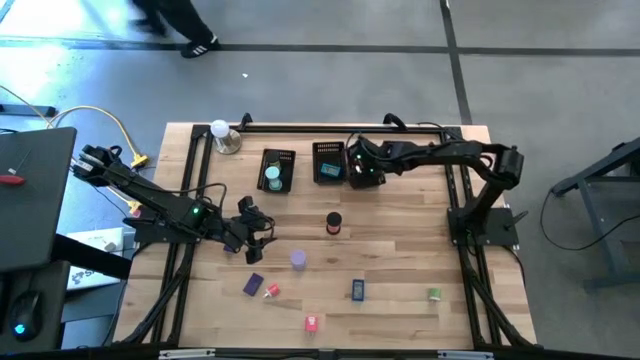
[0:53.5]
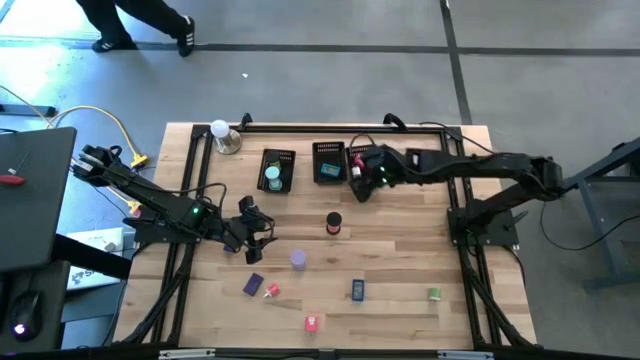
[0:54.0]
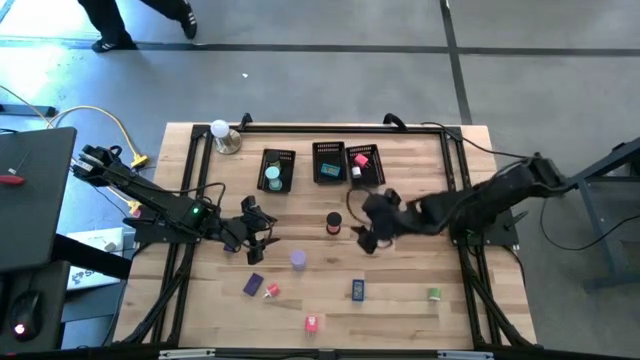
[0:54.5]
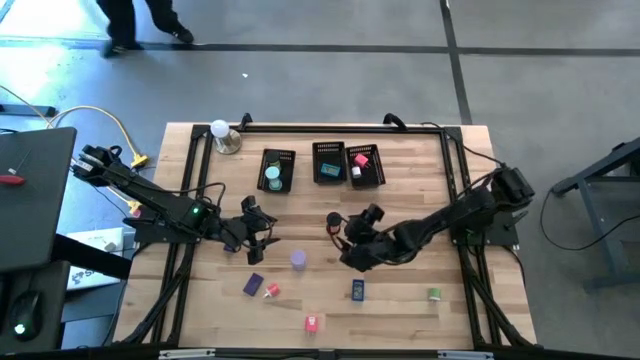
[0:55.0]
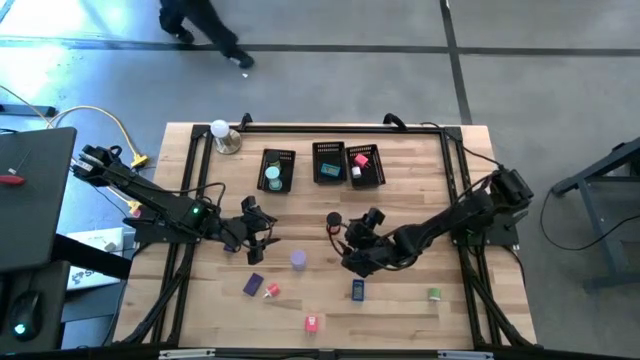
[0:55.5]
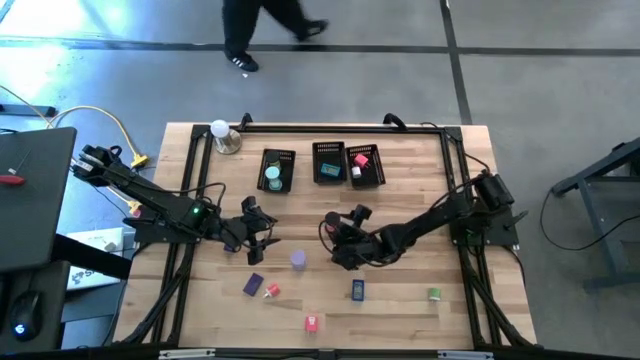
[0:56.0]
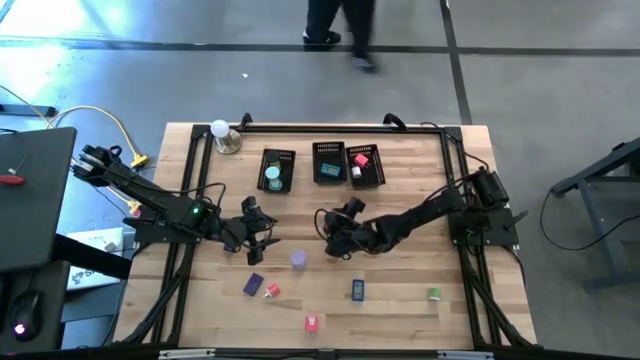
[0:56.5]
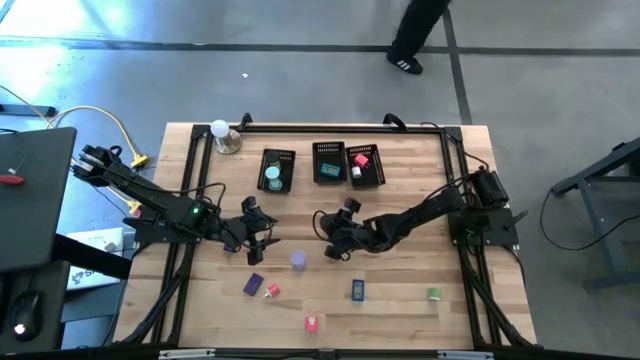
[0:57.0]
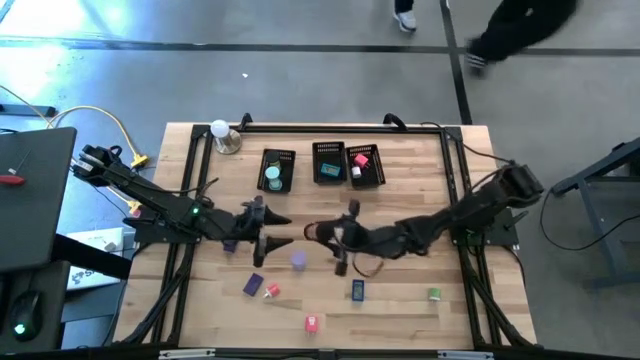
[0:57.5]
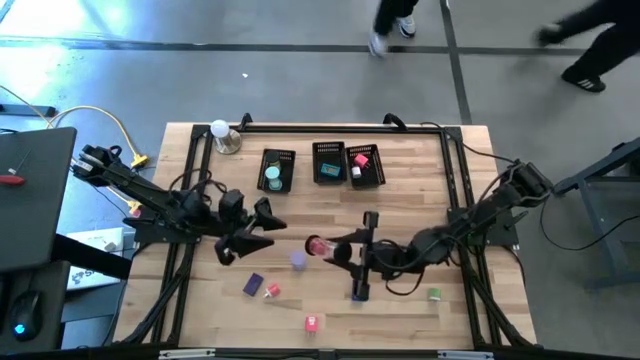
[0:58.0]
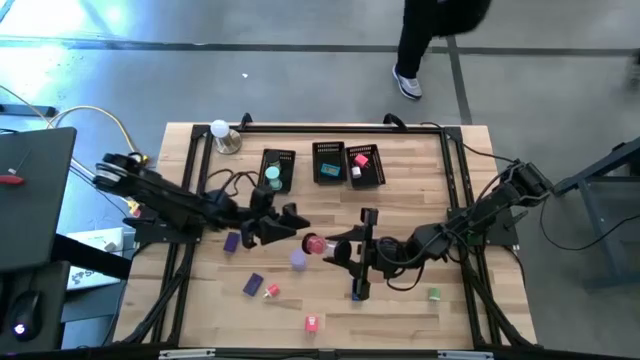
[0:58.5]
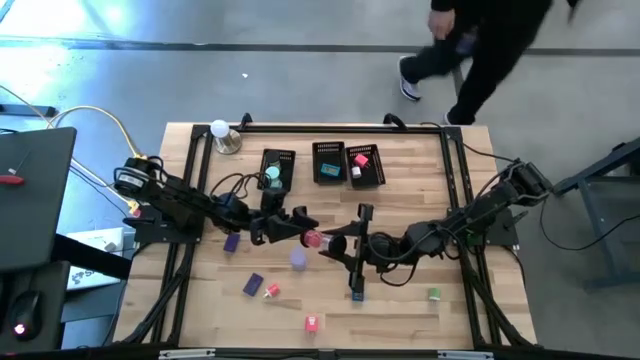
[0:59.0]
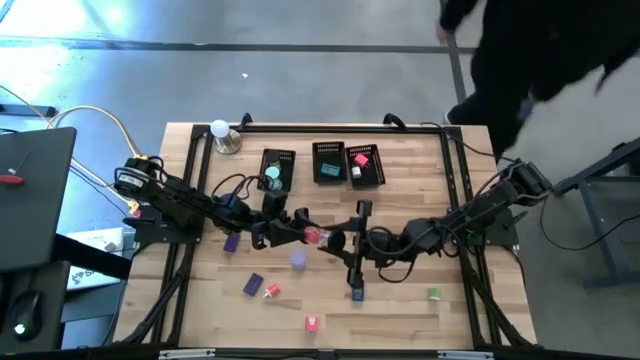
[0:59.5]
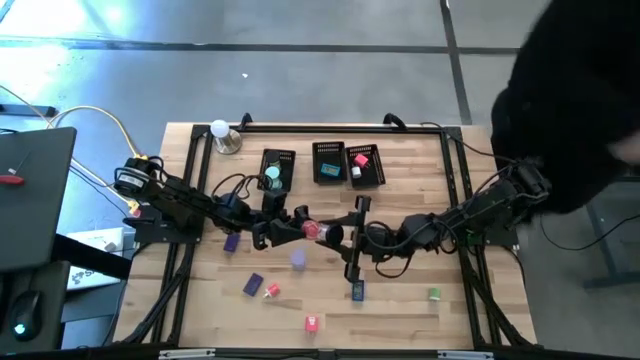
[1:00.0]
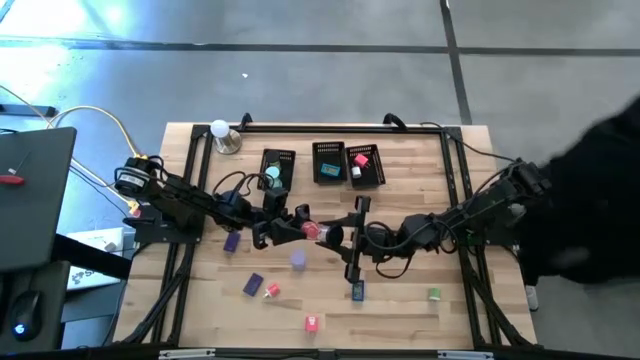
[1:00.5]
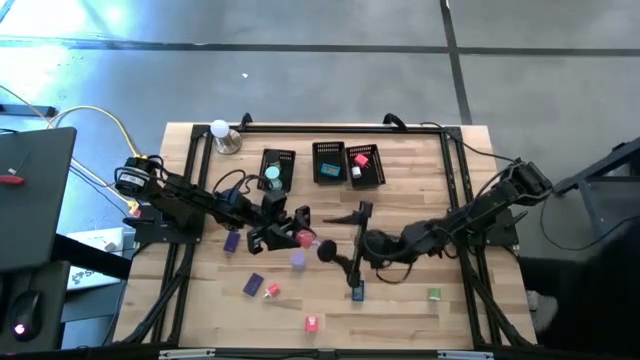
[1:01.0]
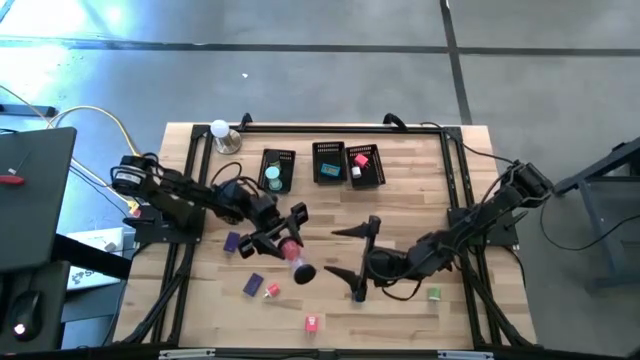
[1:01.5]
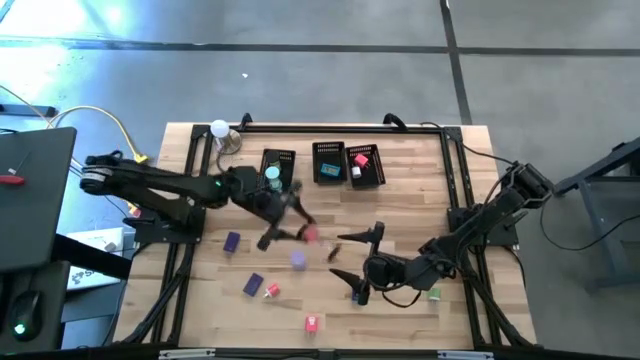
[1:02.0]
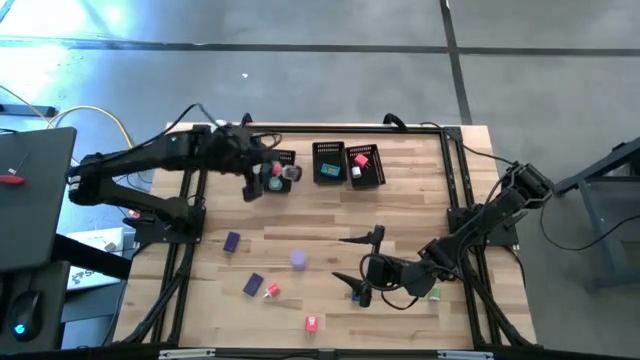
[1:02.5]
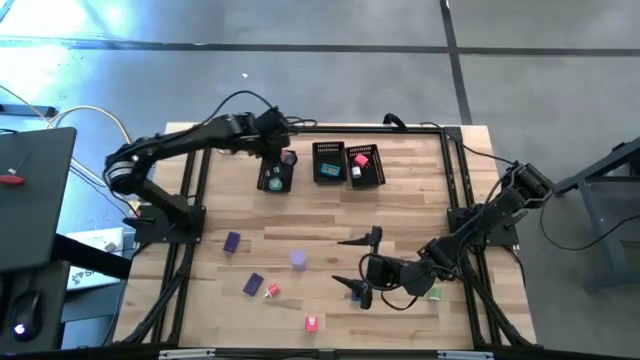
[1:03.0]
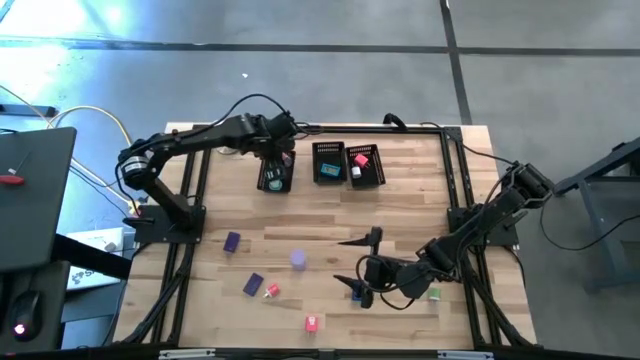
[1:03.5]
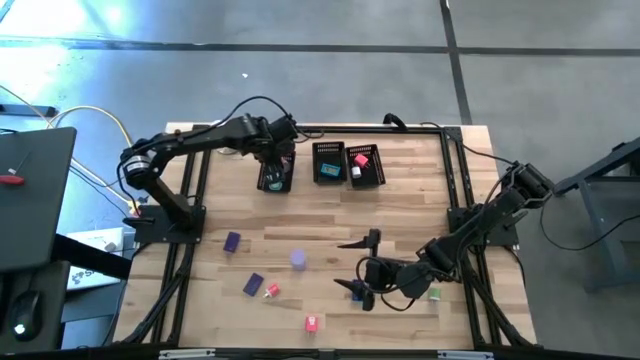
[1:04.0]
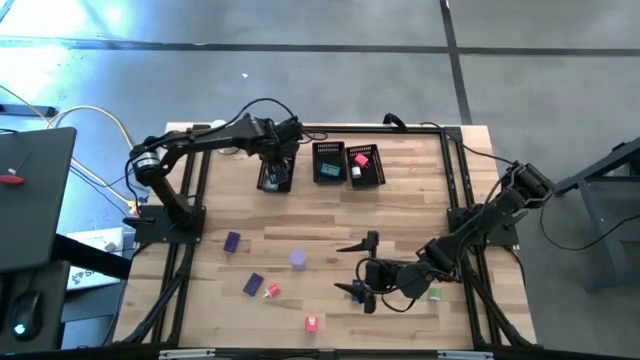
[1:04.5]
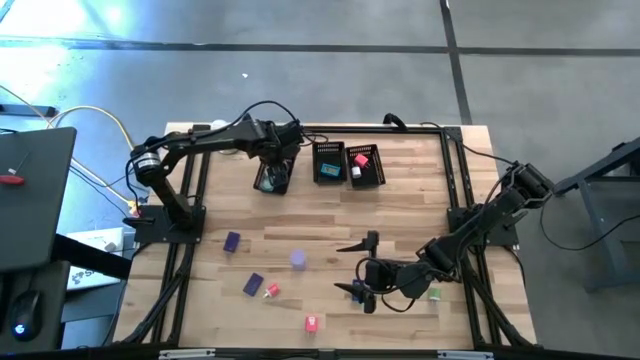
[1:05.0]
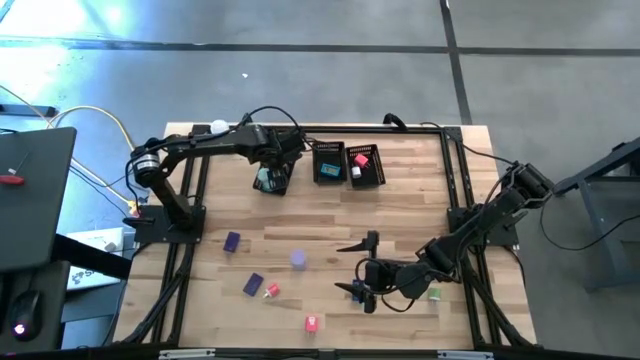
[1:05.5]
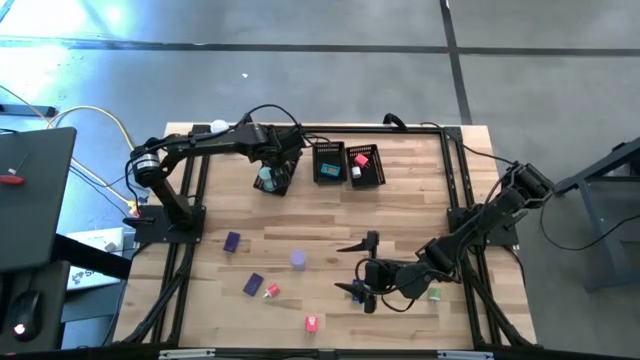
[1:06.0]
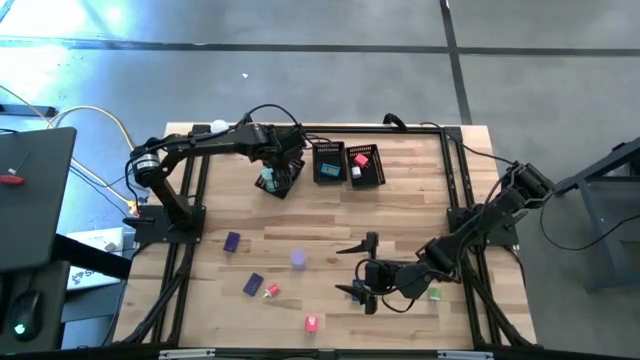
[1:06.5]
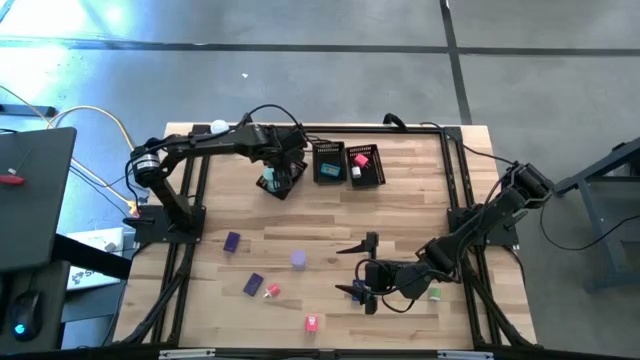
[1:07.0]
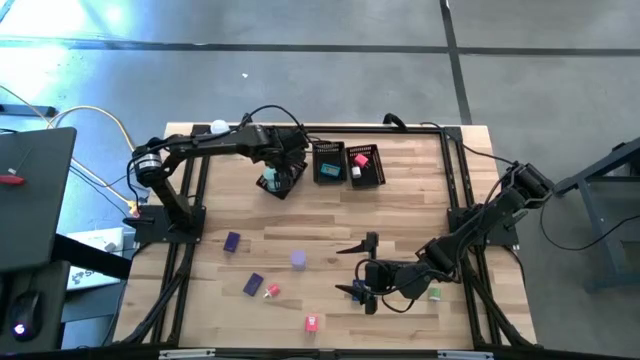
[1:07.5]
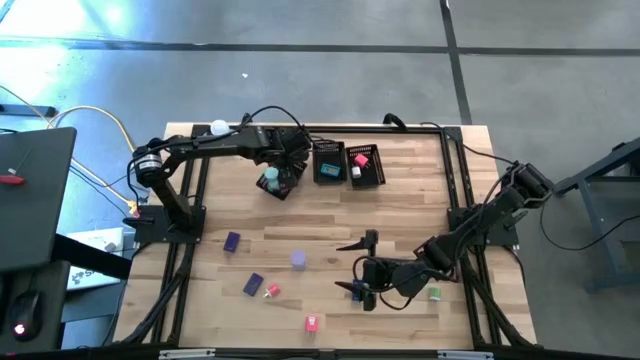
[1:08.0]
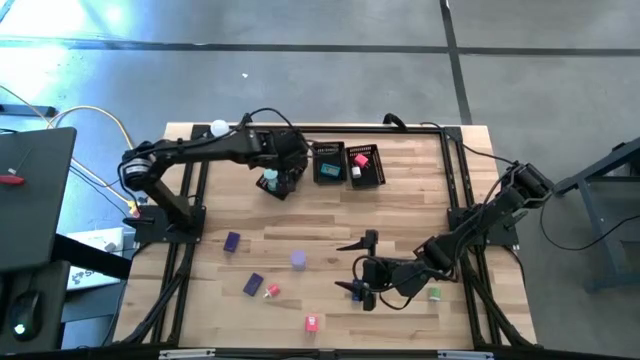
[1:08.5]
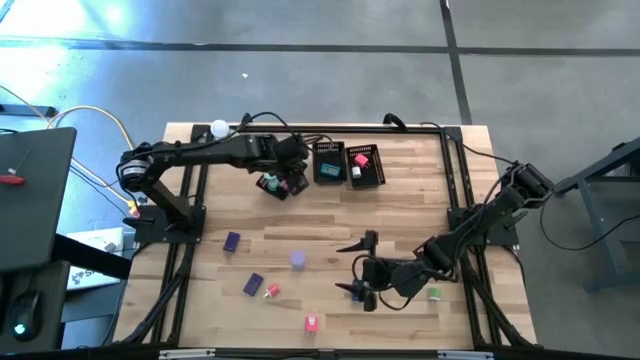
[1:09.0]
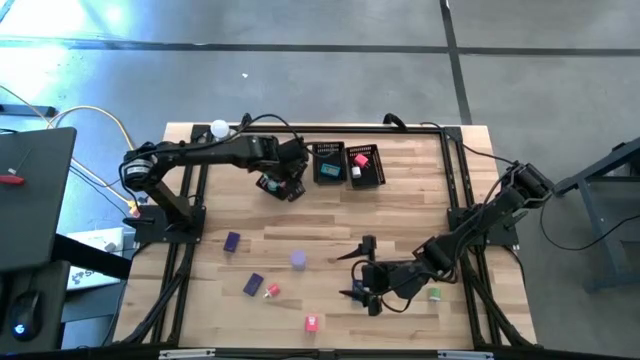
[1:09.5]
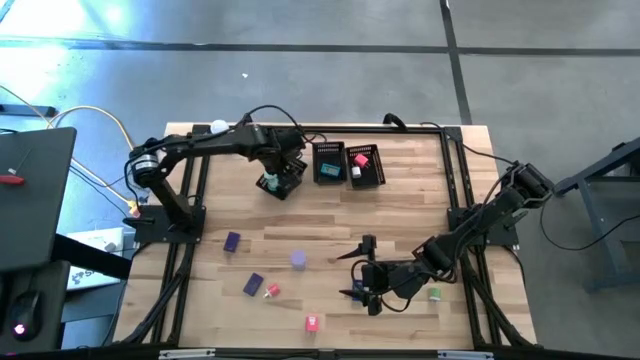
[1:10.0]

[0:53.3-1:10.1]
Task: Pick & Place Office items
Put the red and black hourglass into the left black bin

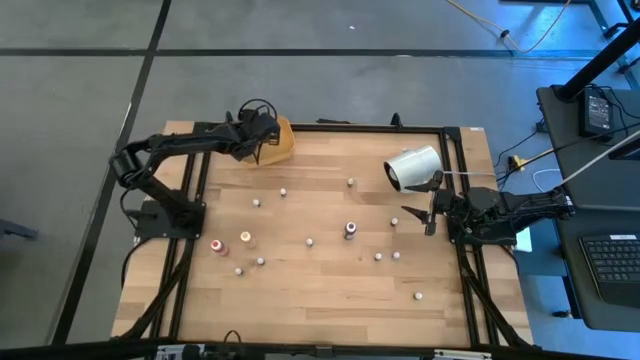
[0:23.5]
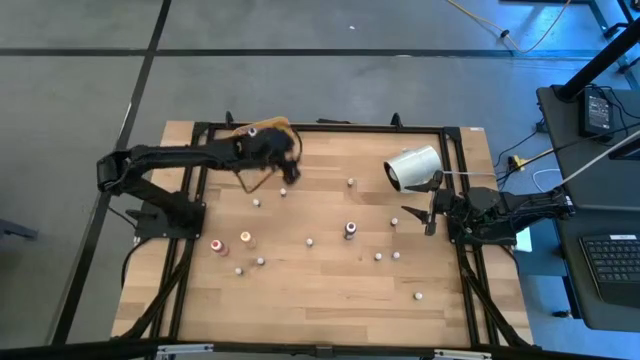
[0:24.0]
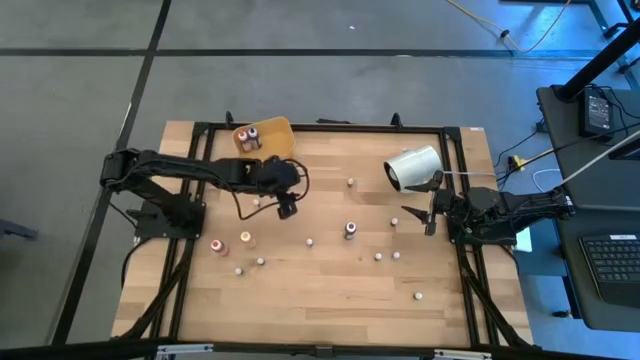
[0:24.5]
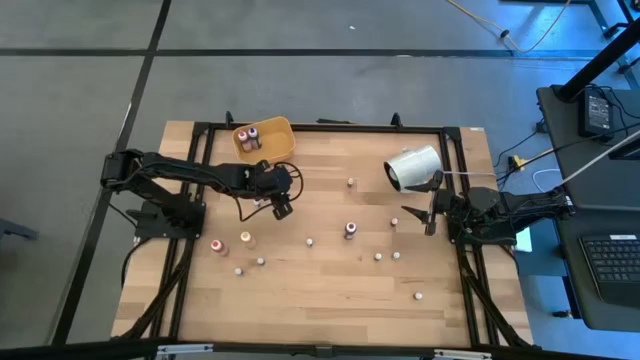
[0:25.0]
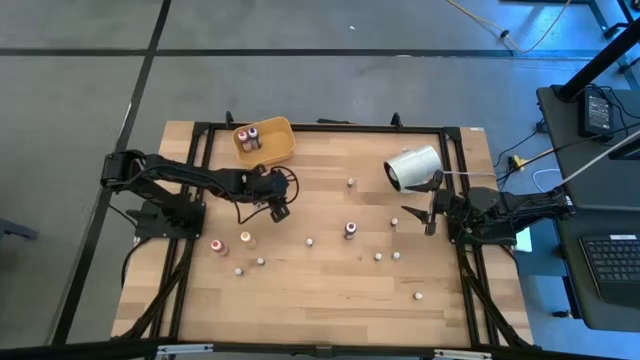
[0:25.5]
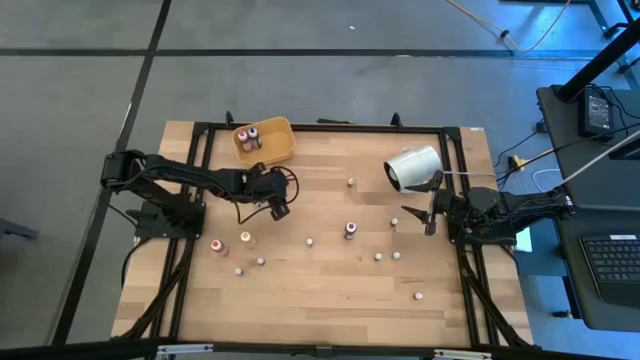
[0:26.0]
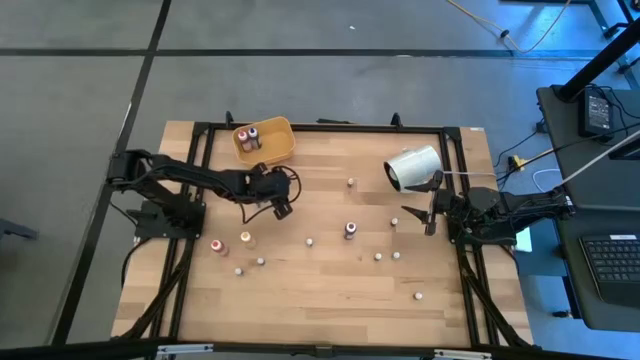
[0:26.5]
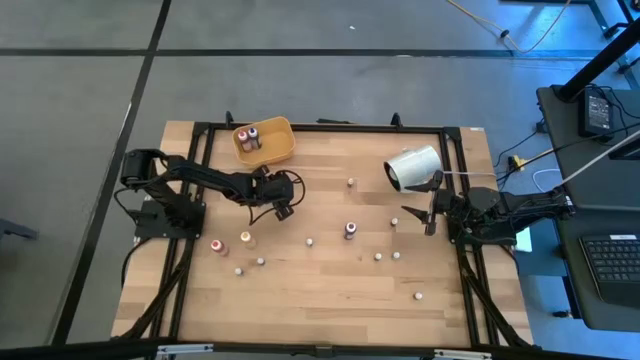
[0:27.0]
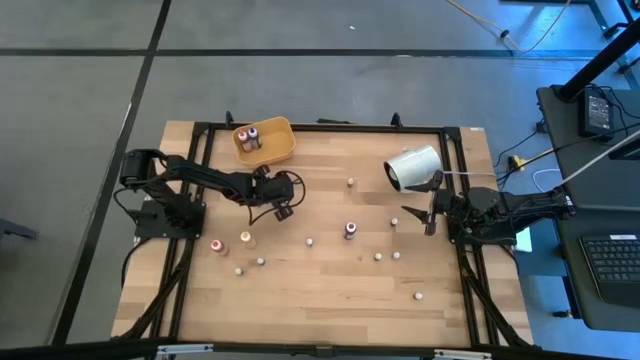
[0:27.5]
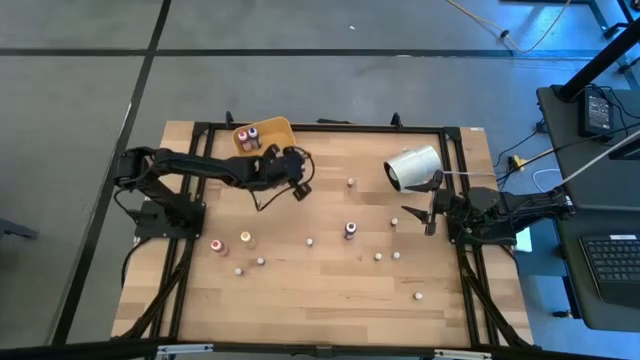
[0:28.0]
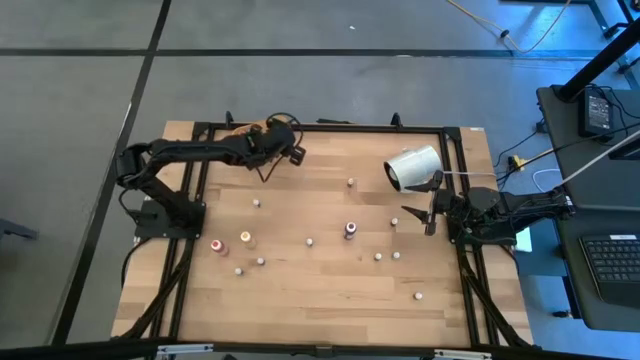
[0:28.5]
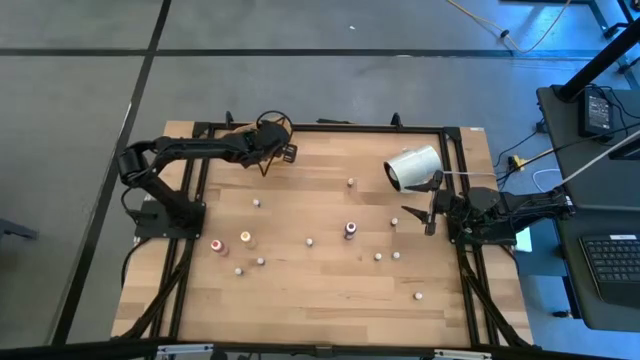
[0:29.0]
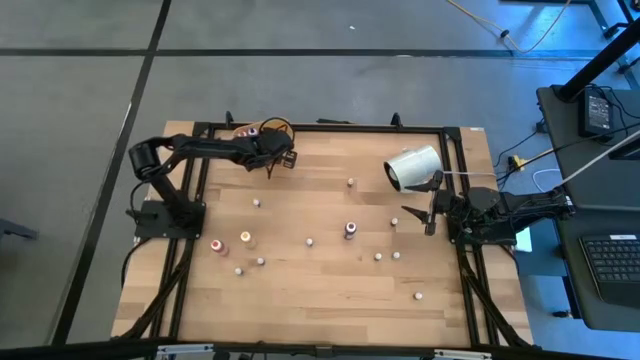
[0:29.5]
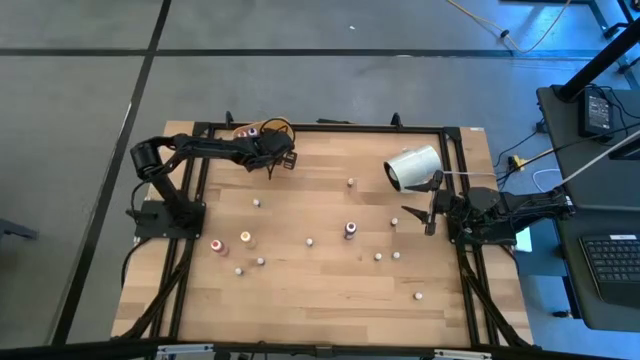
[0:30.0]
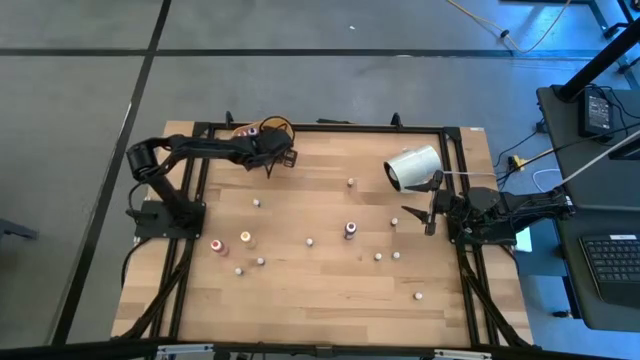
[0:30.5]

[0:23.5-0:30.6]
Task: Pick & Place food coloring
Put the small green food coloring bottle into the yellow bin
